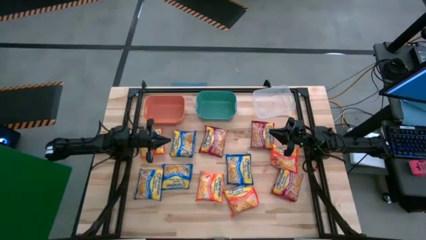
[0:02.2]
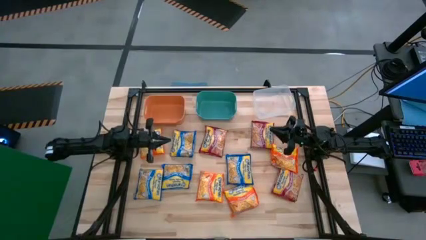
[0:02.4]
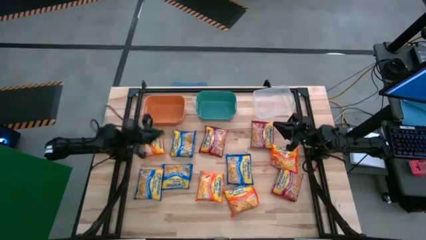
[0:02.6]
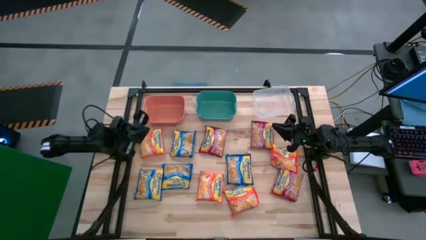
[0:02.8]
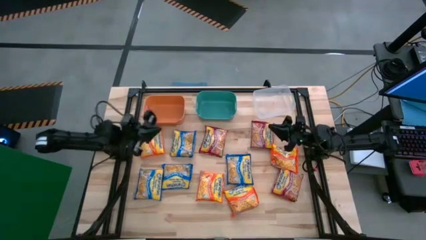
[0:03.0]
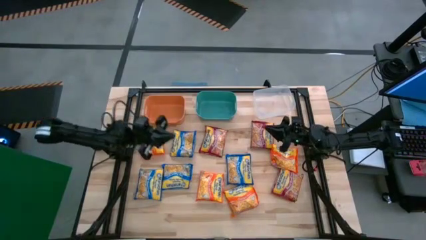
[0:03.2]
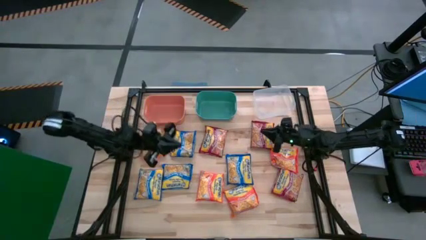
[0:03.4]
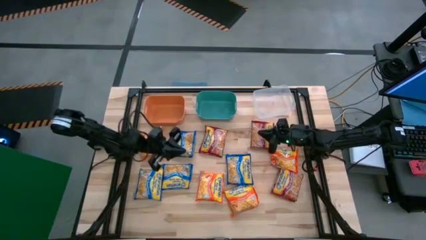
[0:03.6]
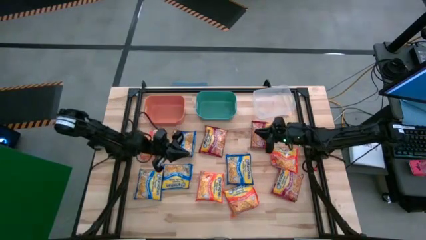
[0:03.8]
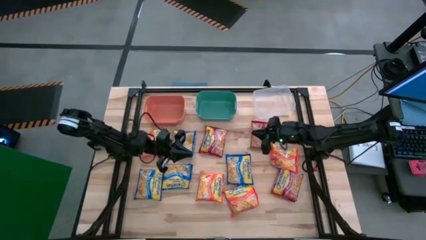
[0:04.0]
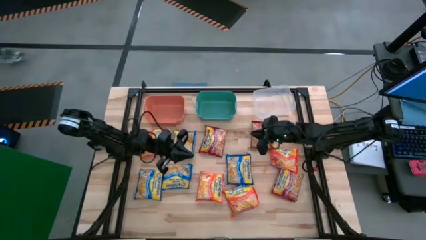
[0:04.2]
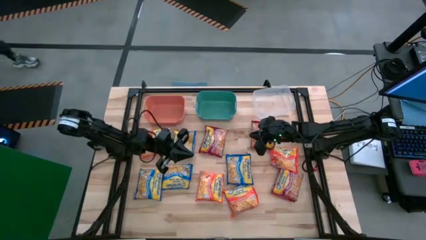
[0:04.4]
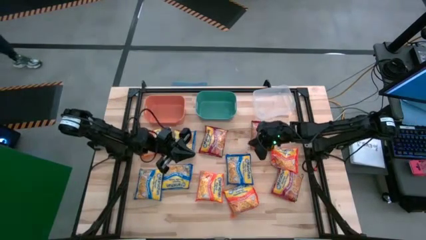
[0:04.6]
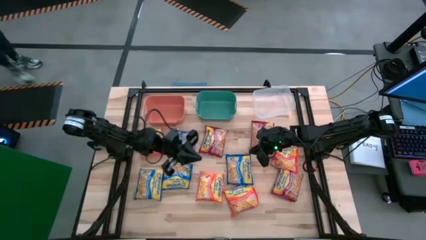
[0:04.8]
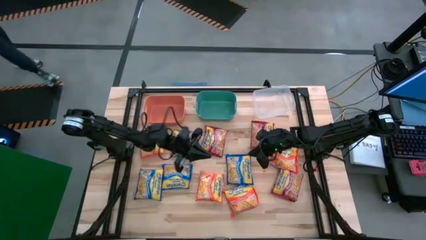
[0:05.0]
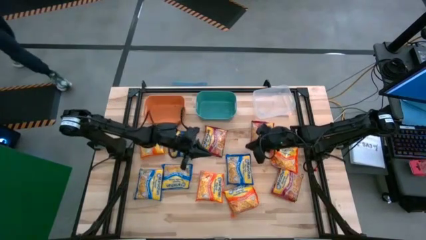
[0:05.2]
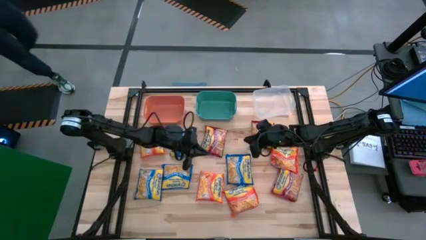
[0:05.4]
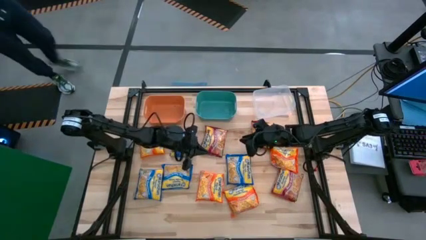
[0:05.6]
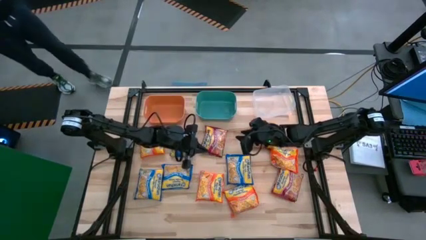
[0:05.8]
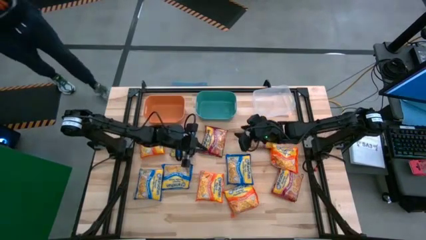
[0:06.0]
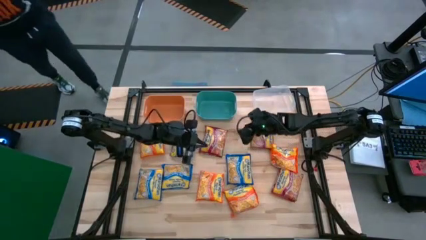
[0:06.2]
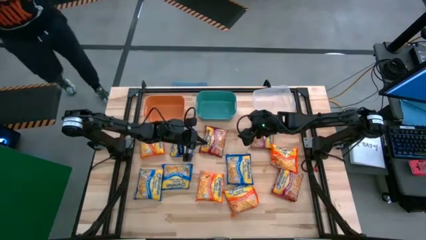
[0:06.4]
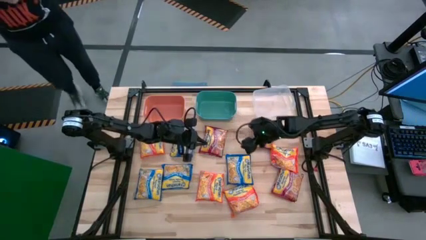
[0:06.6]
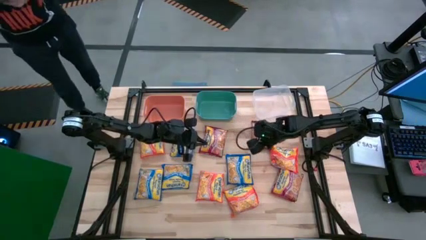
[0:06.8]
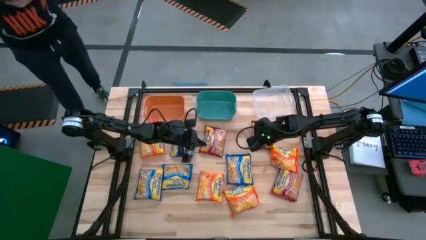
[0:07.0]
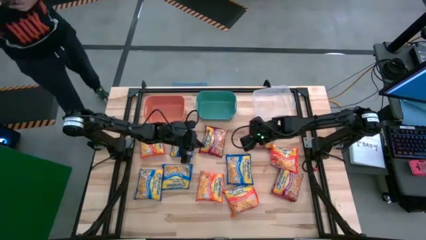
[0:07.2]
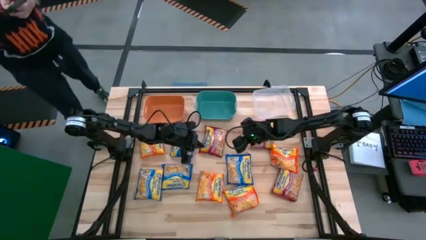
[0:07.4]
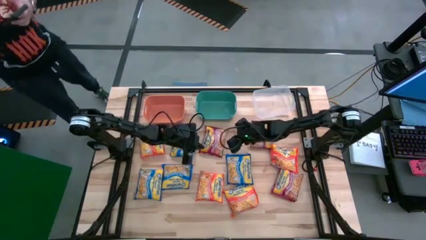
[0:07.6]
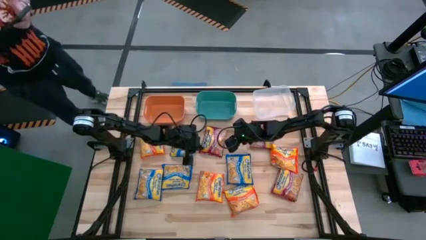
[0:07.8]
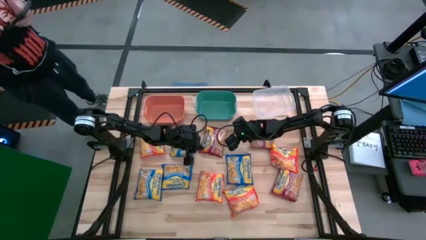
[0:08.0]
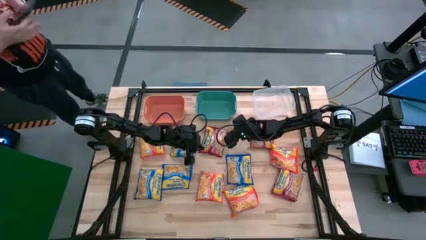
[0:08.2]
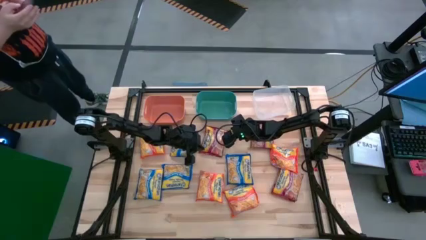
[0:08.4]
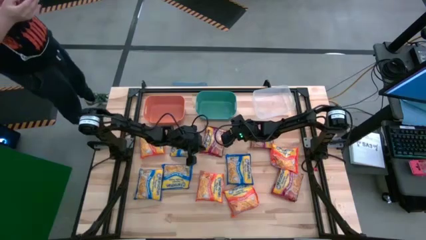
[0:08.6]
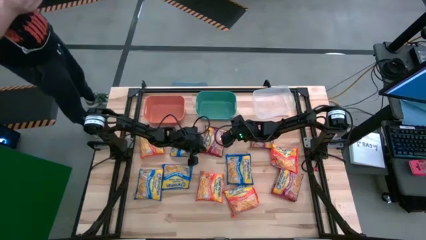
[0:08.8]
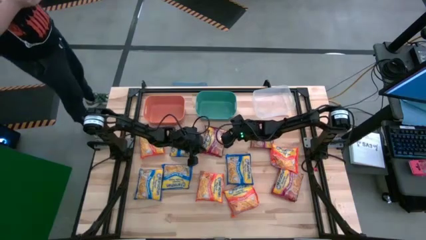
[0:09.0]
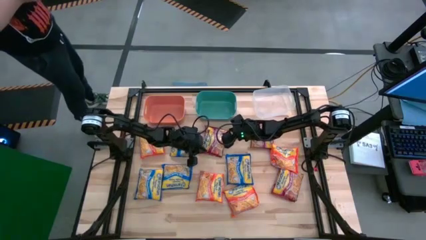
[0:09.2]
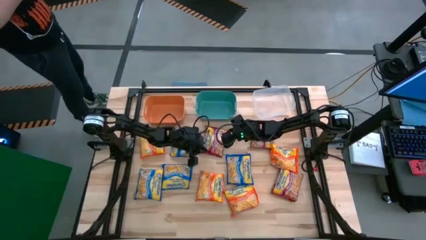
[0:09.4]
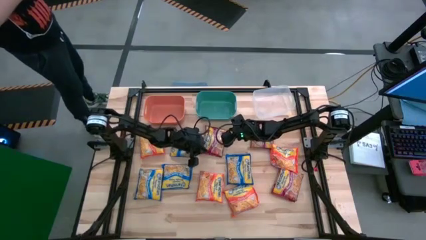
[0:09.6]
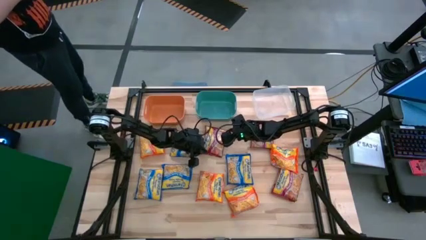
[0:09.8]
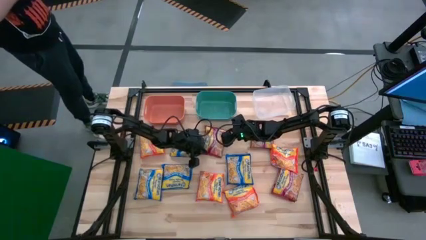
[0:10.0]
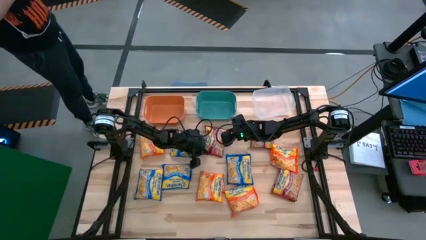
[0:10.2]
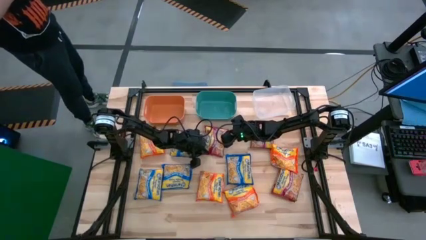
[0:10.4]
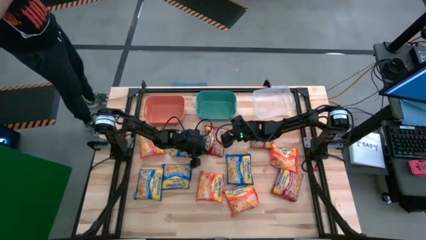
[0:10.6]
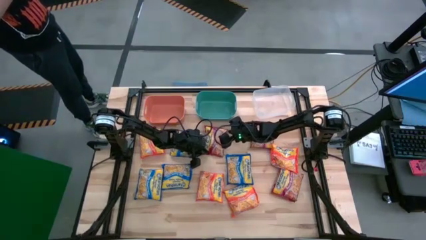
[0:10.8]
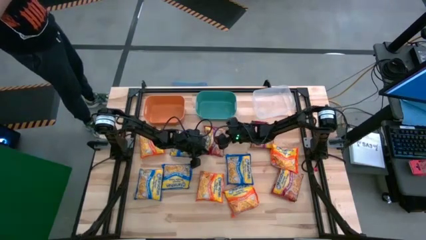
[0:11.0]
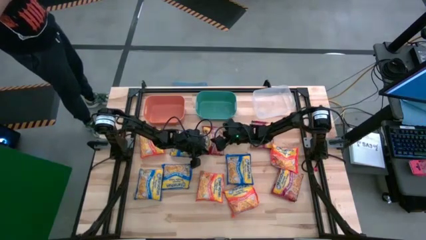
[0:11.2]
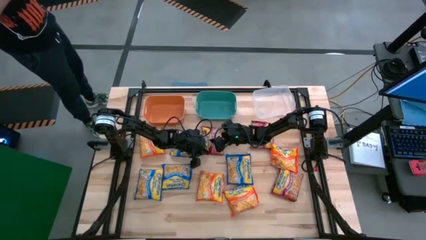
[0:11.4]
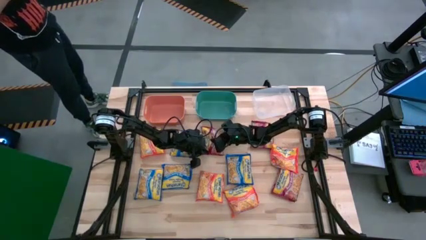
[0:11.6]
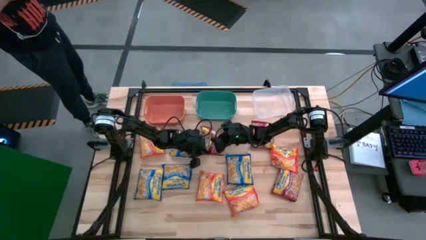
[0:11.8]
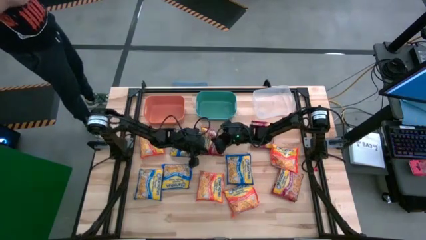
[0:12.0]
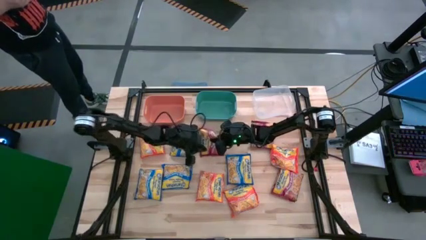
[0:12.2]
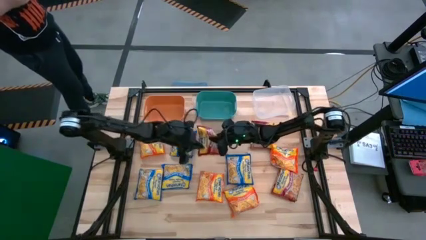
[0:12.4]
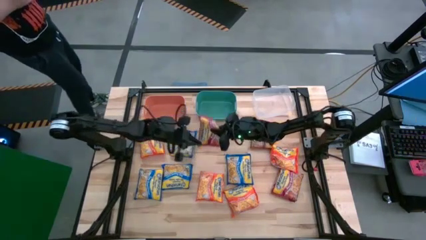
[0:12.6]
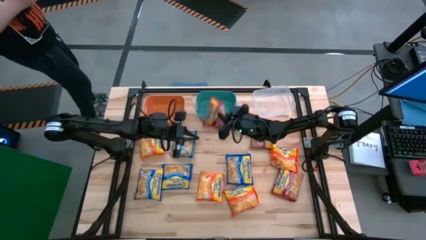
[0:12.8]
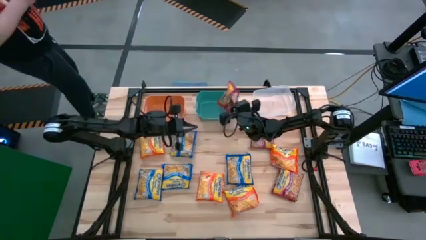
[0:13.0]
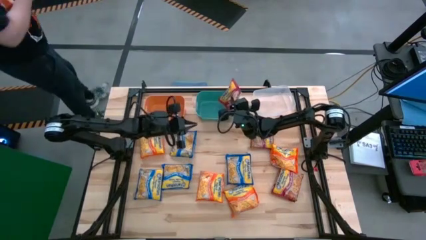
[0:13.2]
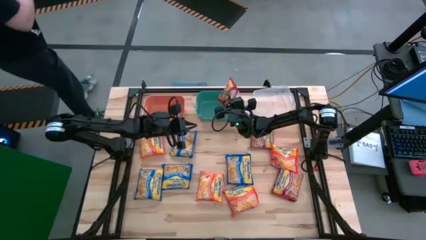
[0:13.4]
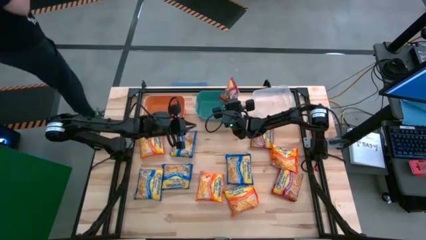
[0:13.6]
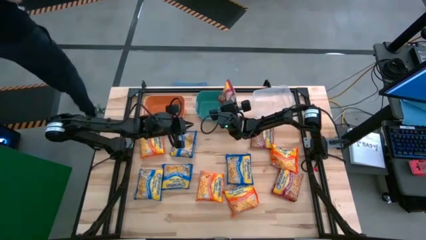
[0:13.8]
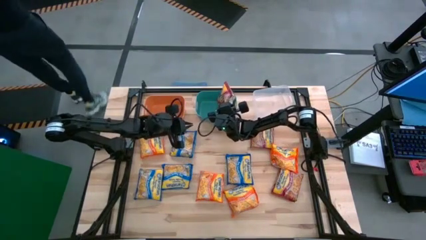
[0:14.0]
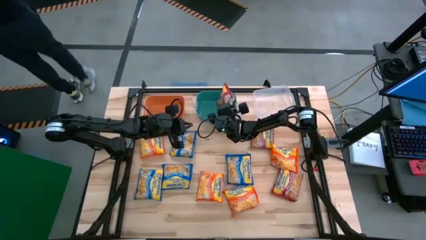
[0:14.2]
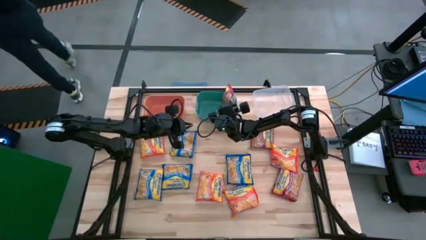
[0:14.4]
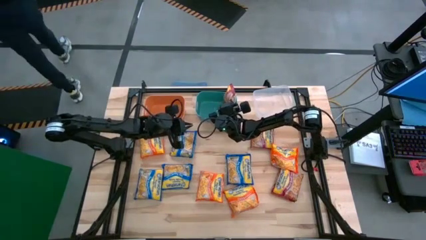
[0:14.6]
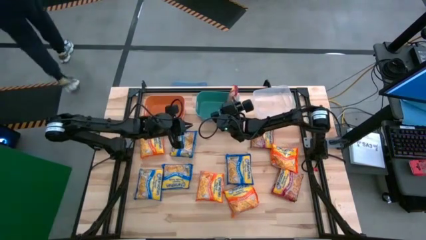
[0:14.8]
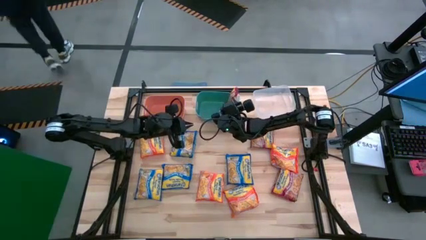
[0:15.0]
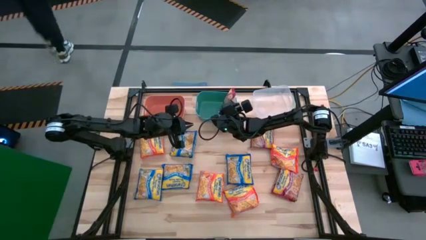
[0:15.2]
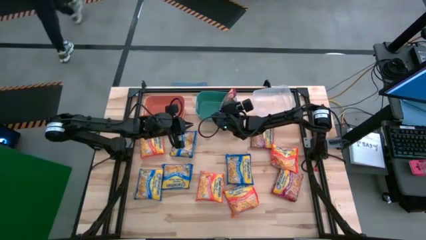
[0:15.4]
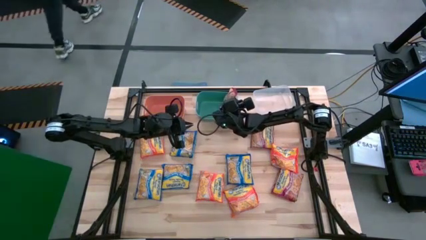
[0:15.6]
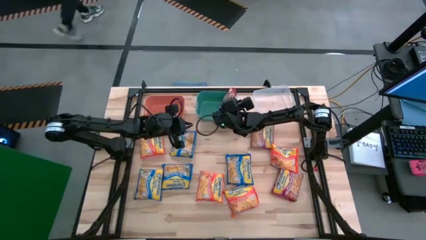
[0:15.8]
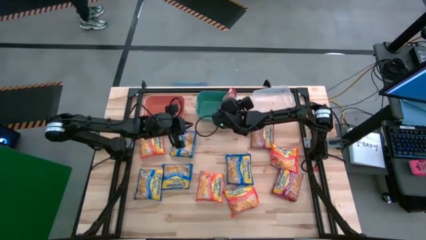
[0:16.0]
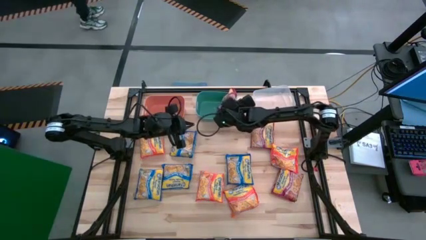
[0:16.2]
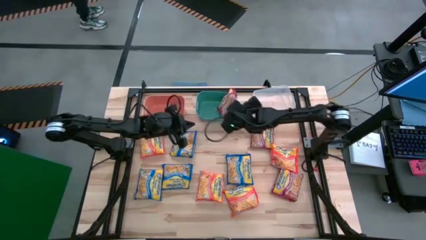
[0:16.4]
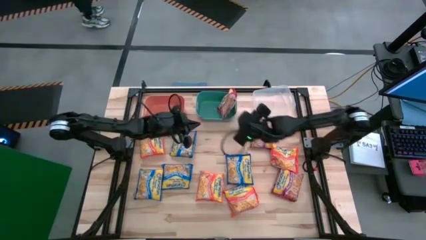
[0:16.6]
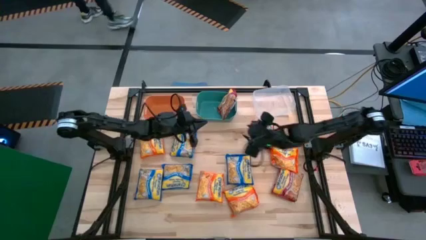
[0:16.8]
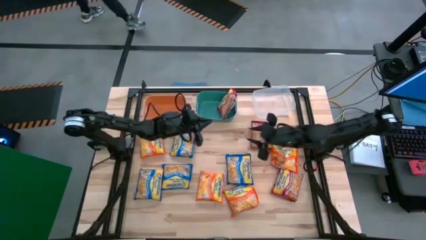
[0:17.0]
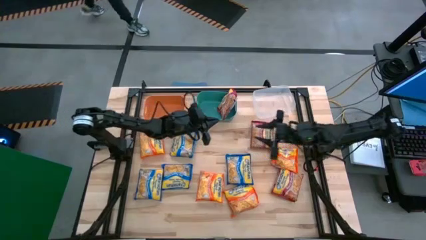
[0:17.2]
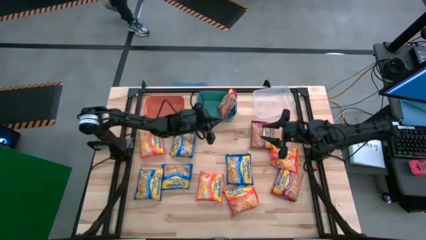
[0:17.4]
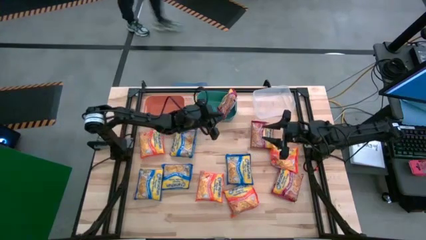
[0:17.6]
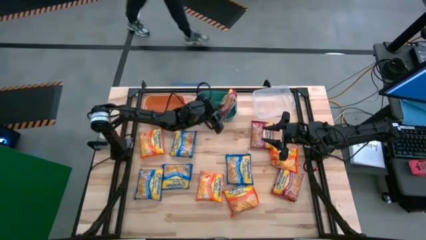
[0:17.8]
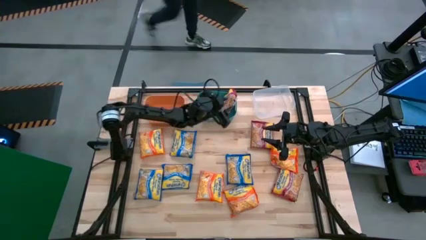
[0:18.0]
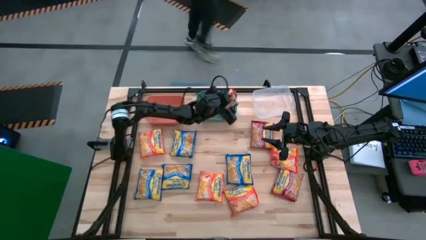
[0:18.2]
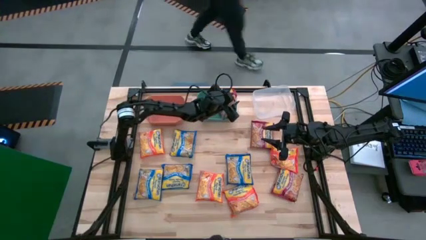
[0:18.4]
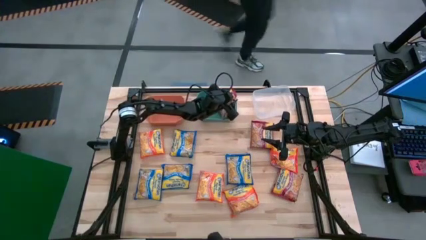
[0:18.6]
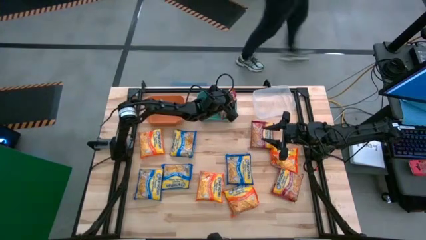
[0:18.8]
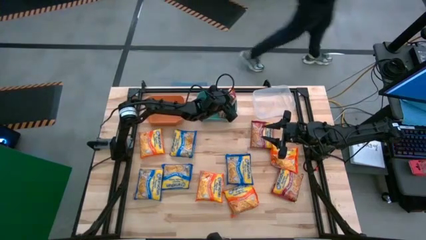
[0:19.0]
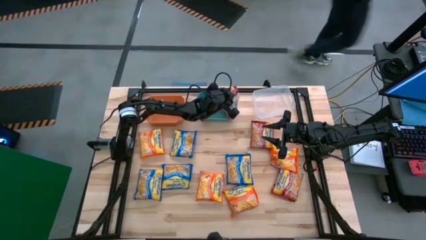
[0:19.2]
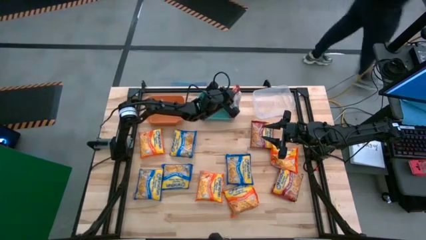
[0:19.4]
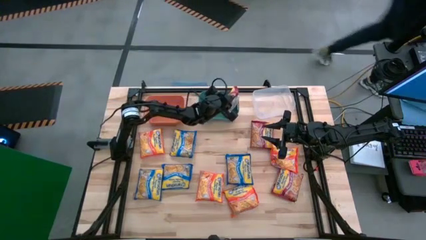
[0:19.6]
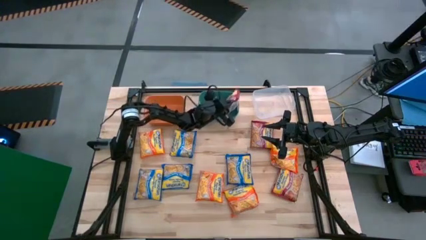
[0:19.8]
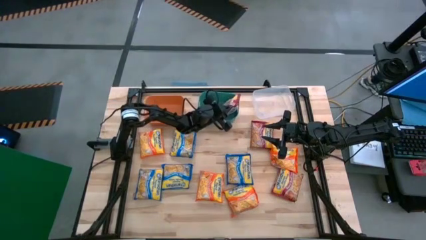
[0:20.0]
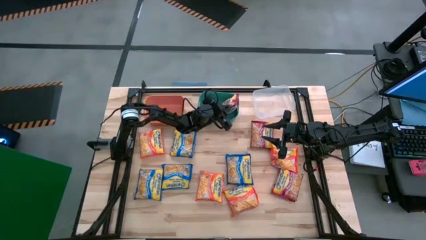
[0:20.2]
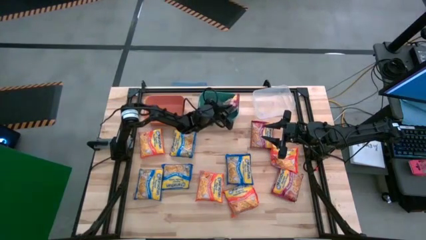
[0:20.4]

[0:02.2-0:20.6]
Task: Sort Maruchan noodles
Put the red noodle pack into the green bin
